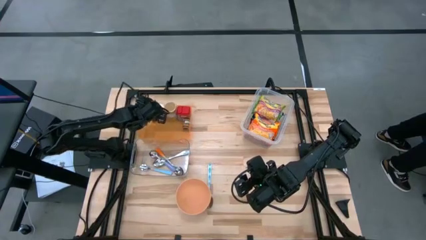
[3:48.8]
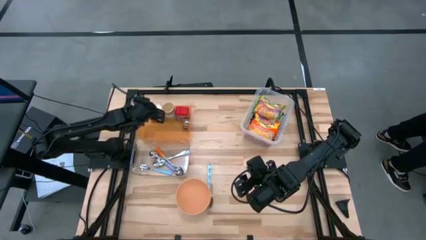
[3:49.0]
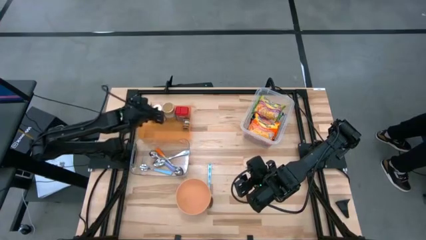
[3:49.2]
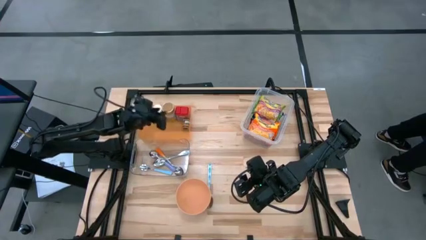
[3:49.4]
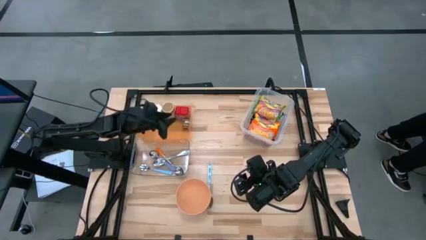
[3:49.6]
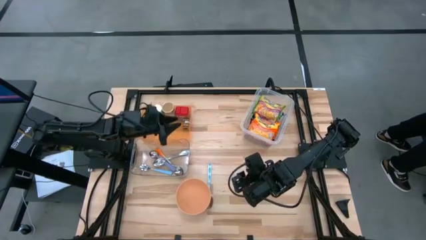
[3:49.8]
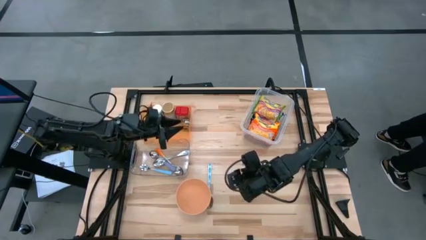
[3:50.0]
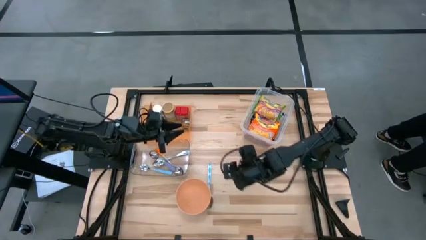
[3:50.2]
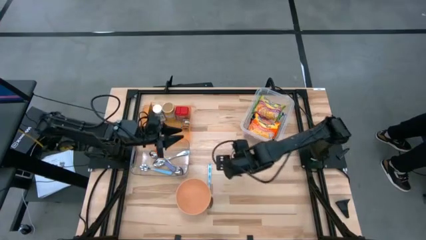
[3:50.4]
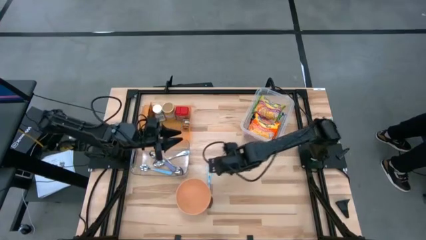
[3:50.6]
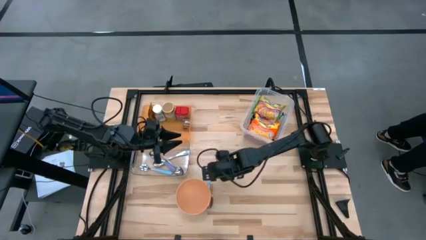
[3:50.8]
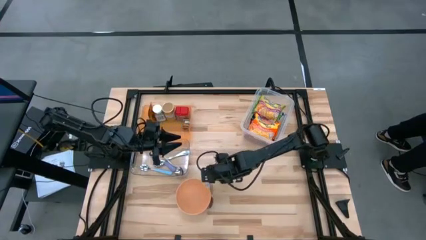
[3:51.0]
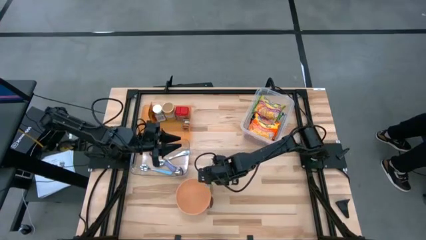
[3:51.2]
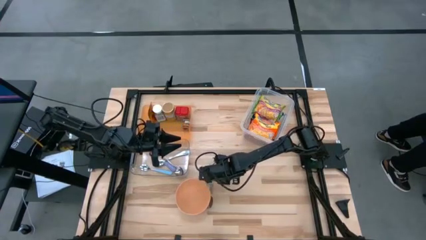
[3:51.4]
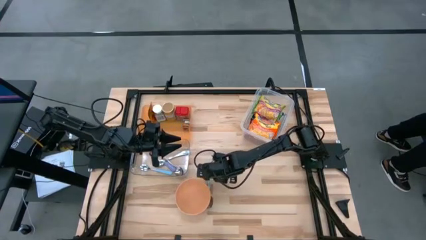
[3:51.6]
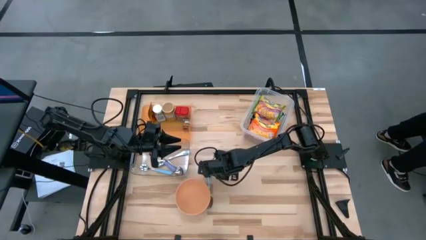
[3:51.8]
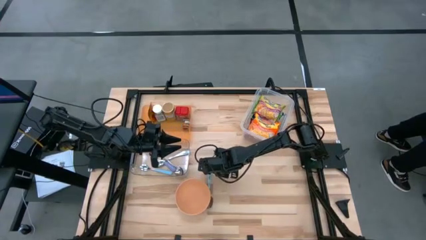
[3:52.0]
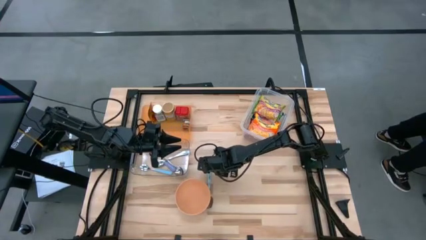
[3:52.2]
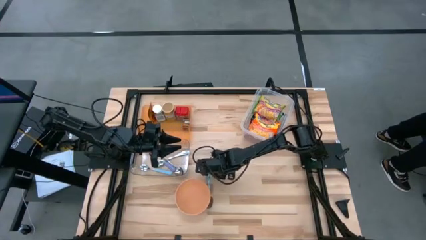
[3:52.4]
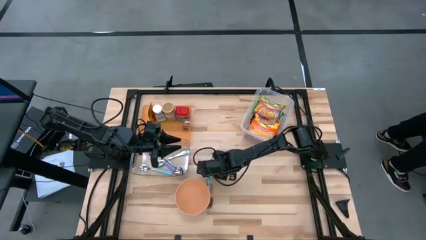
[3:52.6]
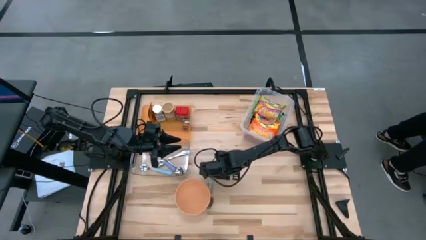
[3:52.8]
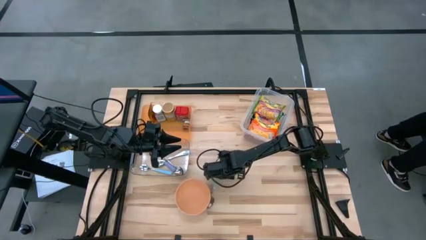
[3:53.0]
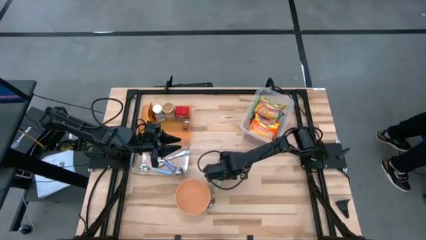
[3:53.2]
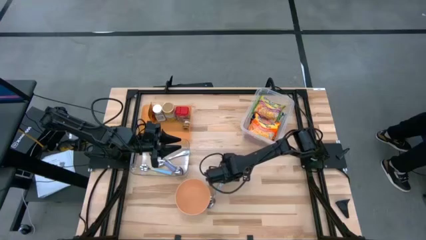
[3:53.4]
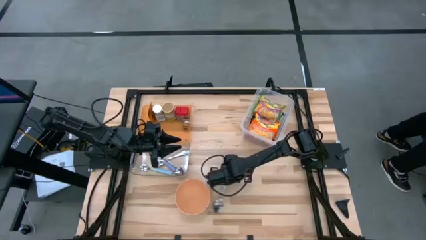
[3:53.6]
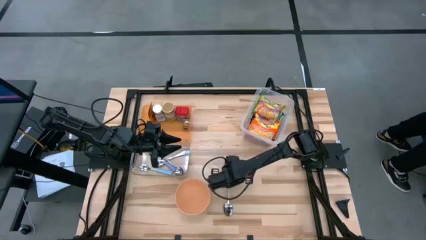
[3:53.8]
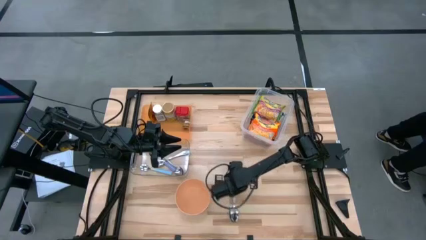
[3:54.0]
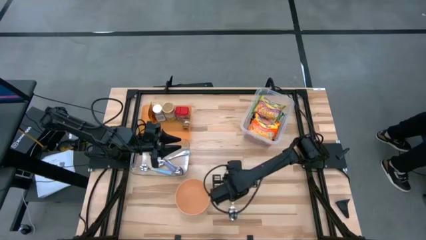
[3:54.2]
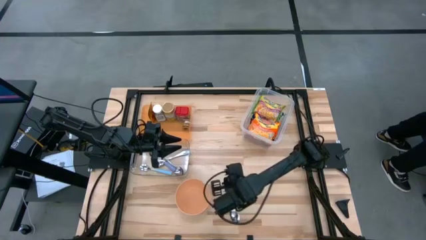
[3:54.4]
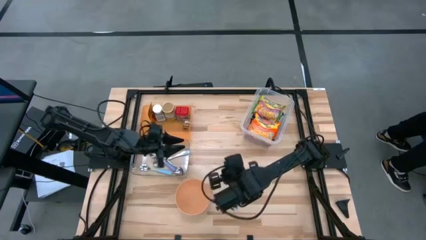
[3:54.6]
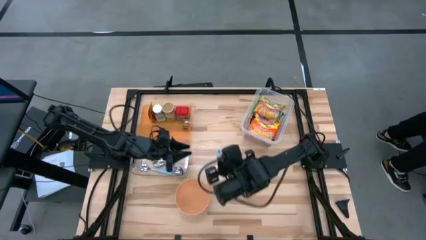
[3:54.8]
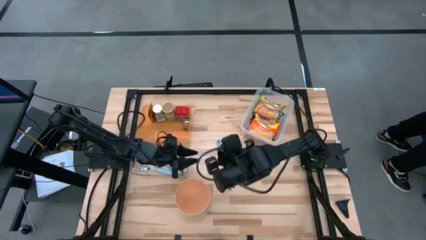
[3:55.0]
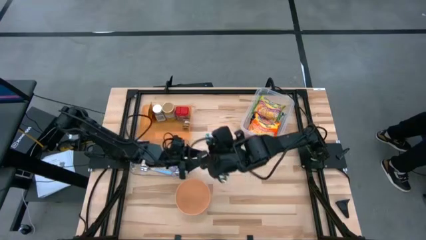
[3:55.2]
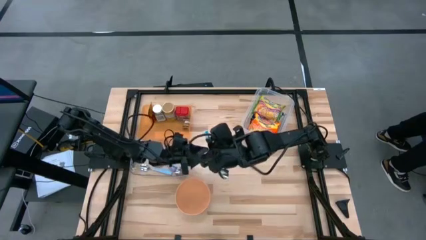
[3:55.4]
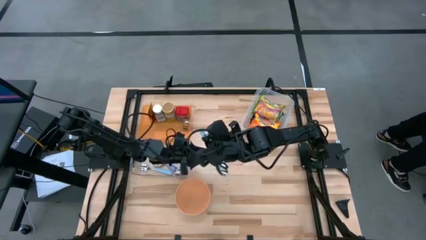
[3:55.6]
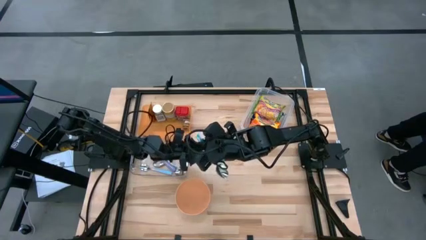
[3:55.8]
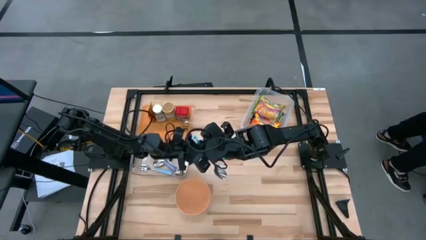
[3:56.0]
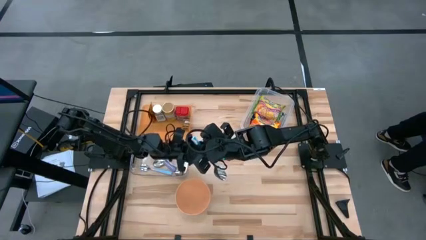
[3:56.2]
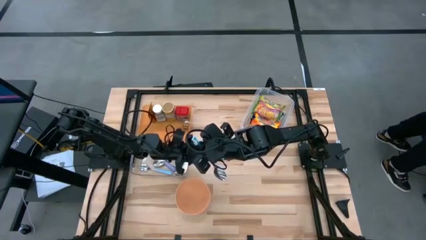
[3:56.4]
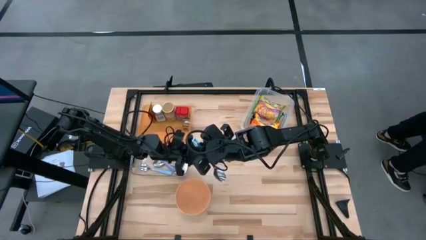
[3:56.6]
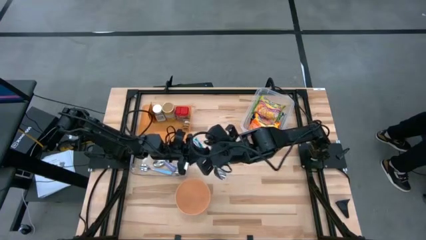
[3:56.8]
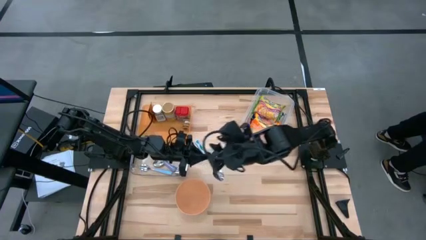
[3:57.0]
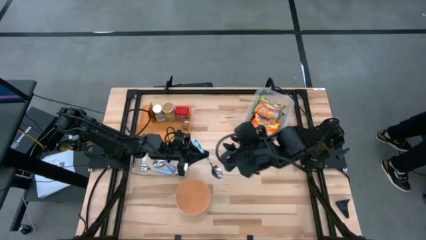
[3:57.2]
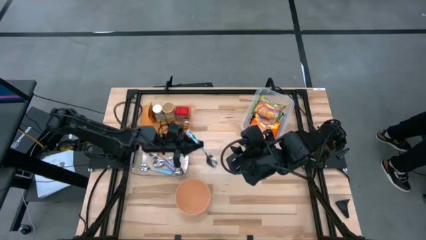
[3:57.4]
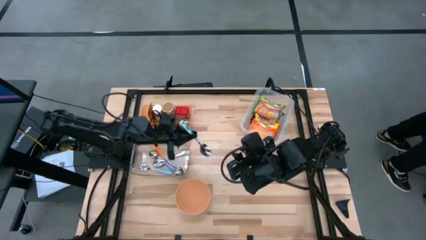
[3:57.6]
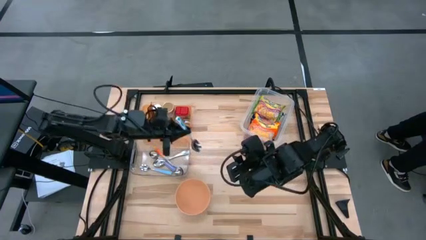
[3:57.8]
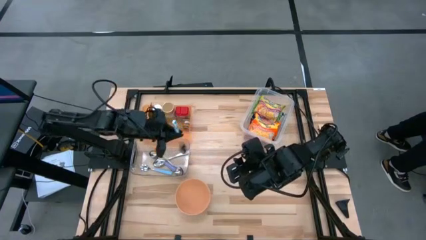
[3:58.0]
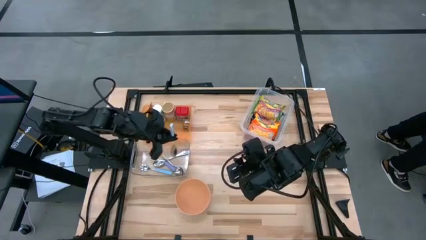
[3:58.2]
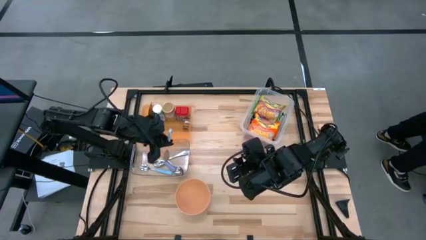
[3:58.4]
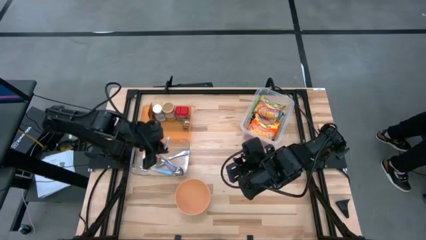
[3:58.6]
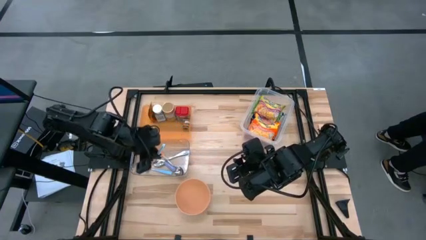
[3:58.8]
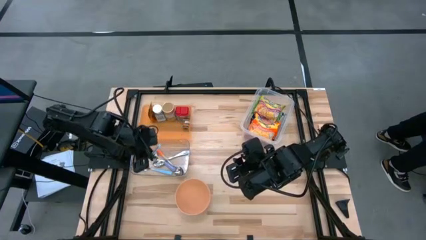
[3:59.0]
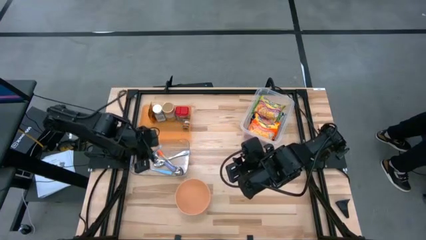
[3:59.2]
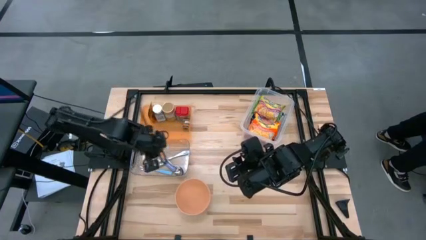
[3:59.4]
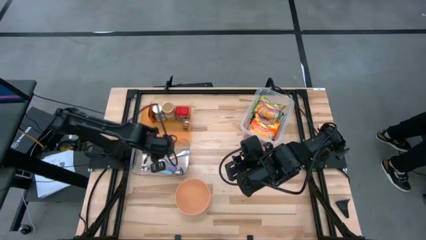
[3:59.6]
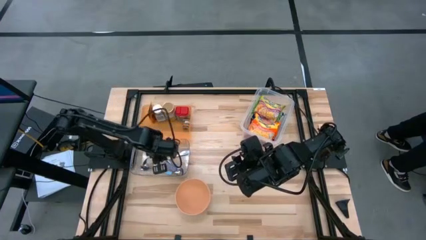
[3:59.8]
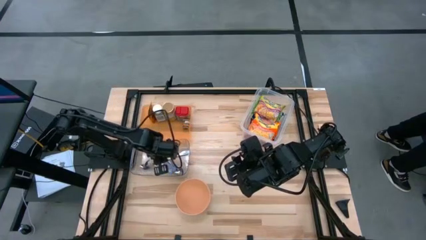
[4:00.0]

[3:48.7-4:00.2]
Task: Pick & Place Food Item
Put the blue and white spoon into the bottom transparent bin
